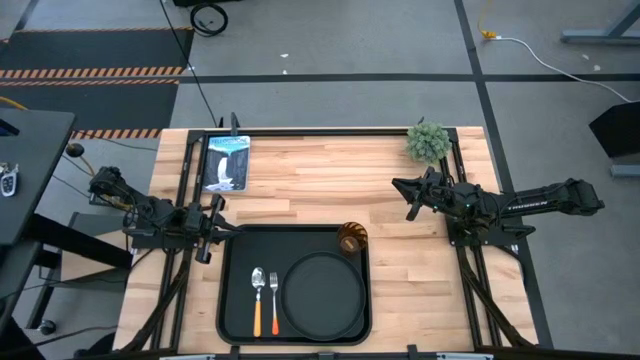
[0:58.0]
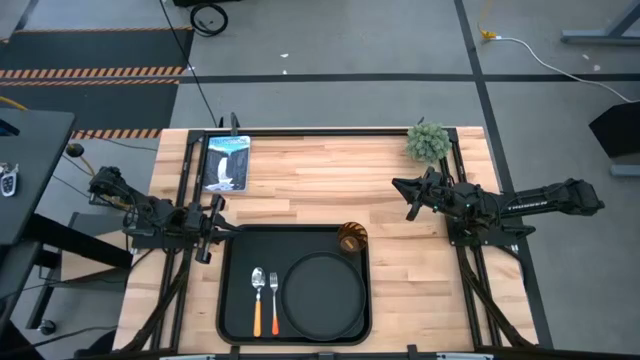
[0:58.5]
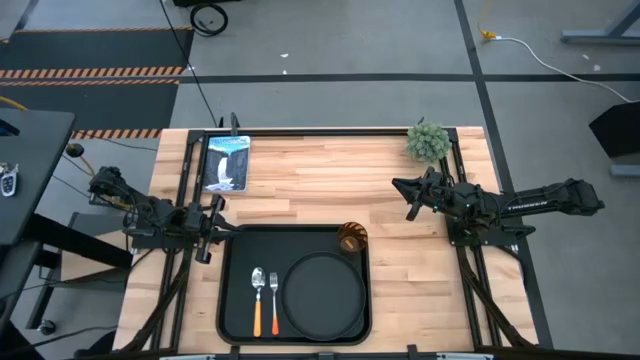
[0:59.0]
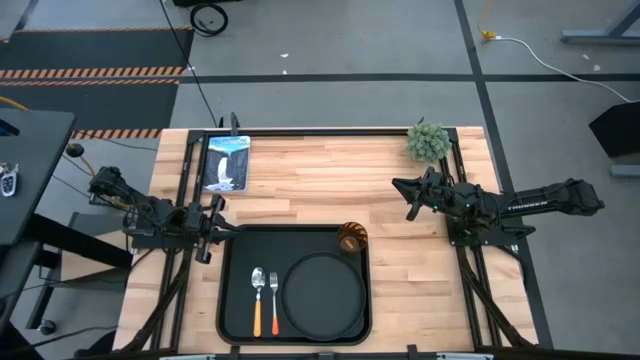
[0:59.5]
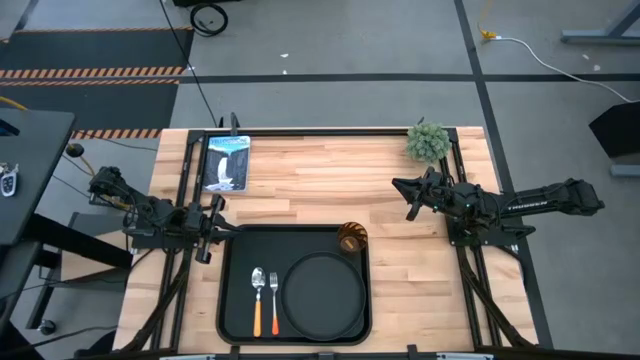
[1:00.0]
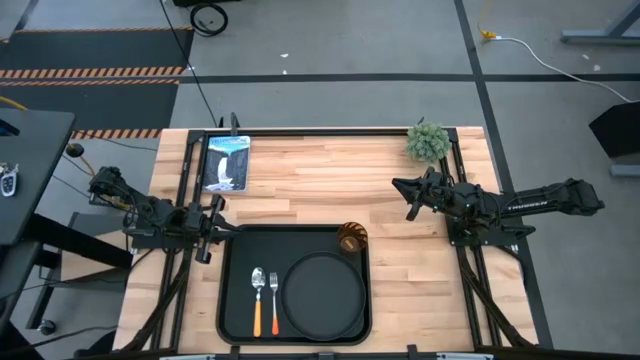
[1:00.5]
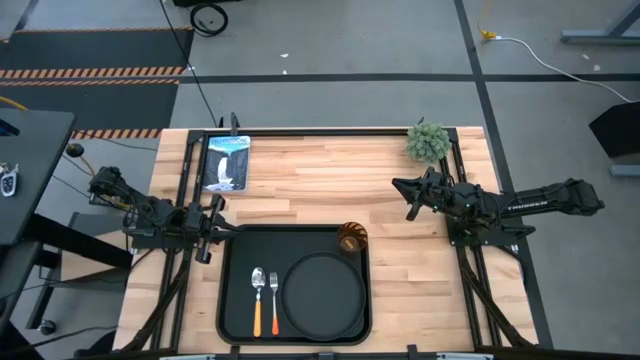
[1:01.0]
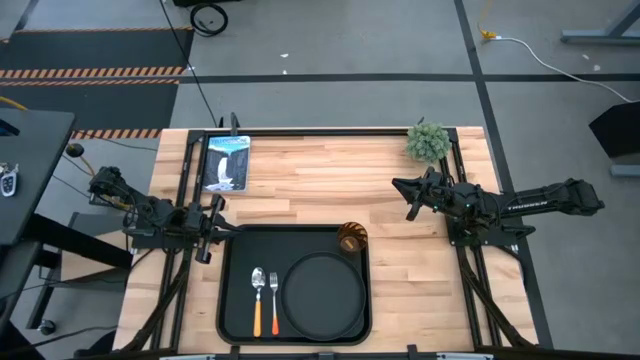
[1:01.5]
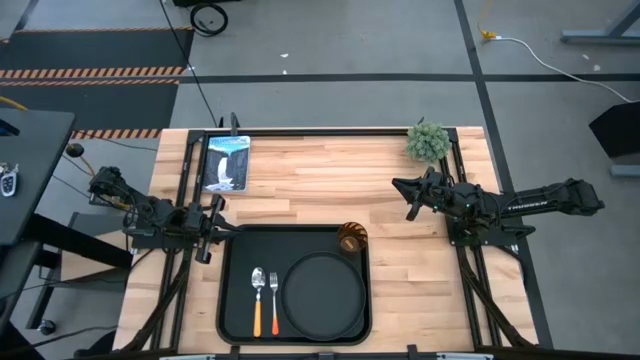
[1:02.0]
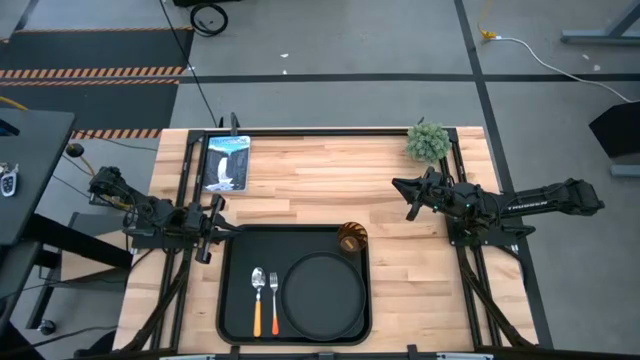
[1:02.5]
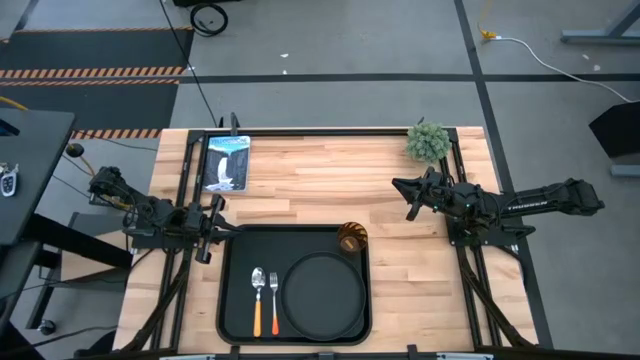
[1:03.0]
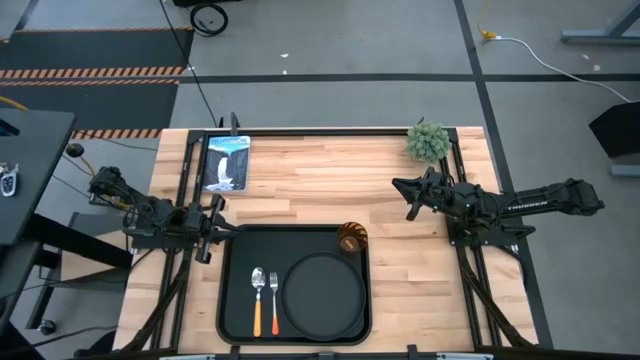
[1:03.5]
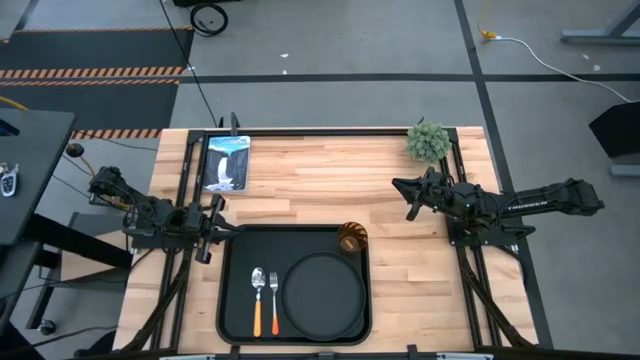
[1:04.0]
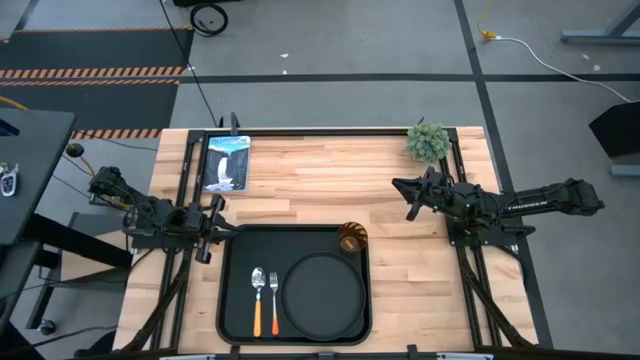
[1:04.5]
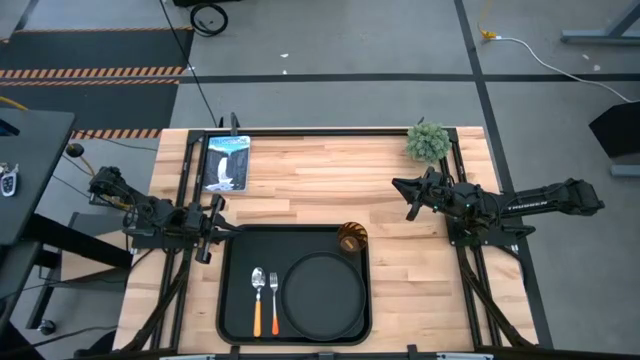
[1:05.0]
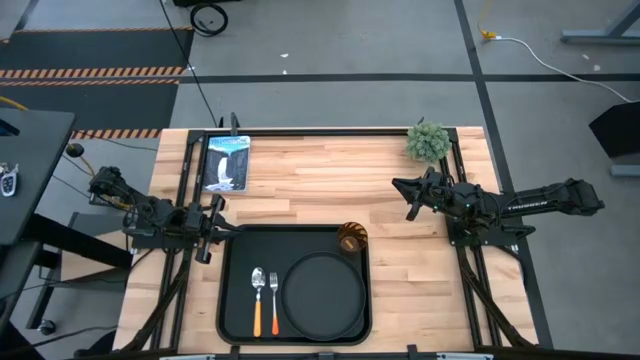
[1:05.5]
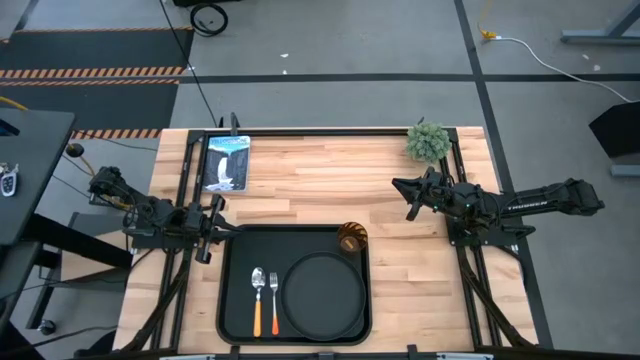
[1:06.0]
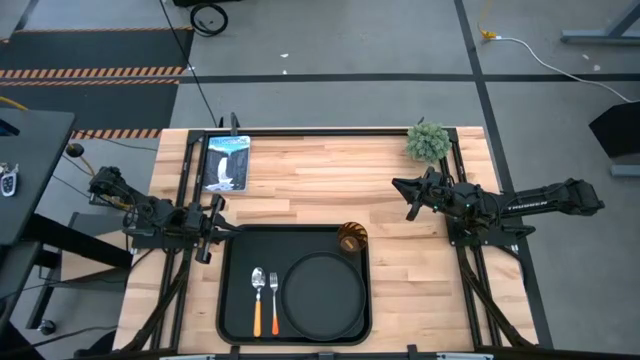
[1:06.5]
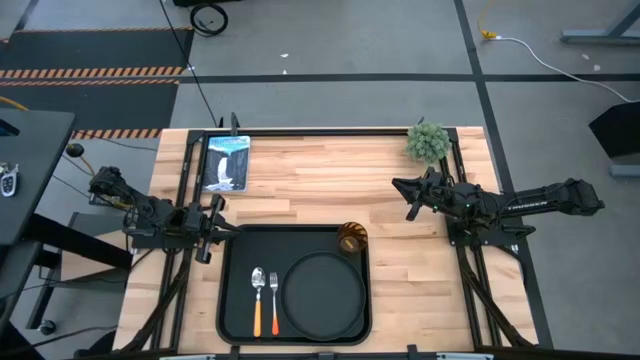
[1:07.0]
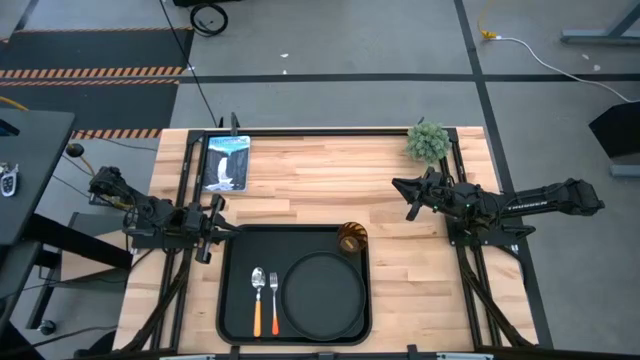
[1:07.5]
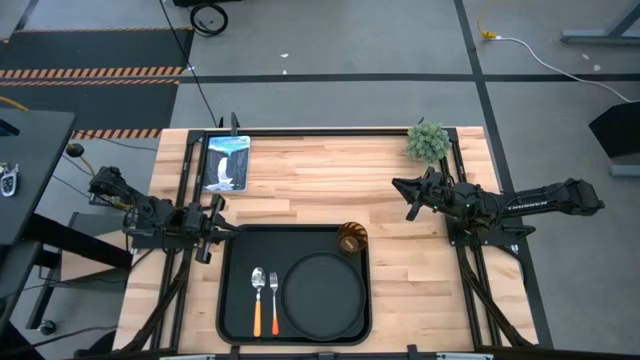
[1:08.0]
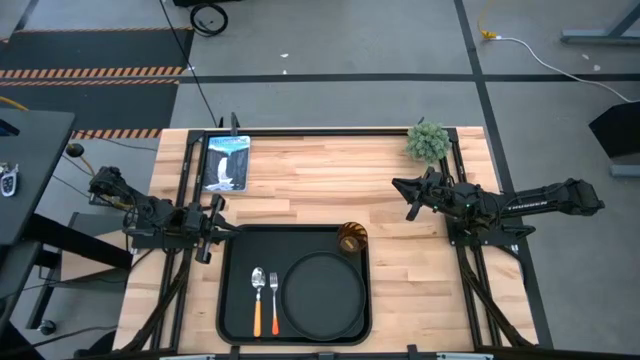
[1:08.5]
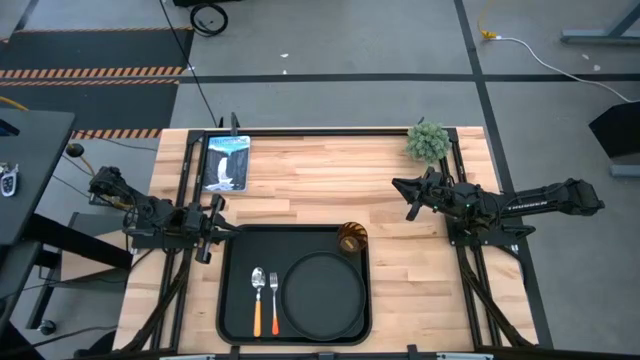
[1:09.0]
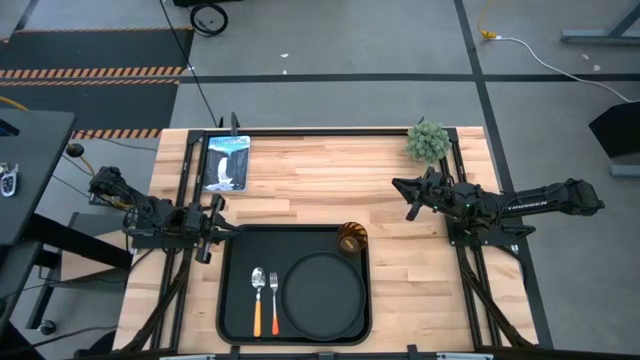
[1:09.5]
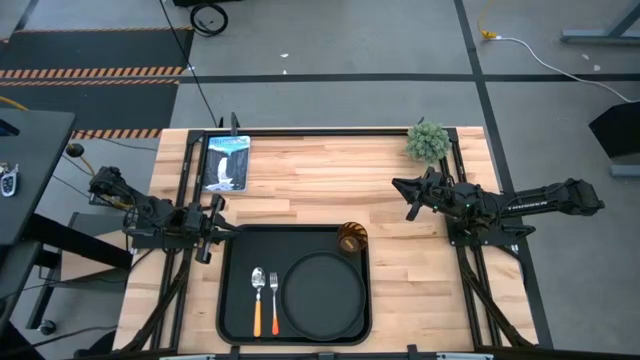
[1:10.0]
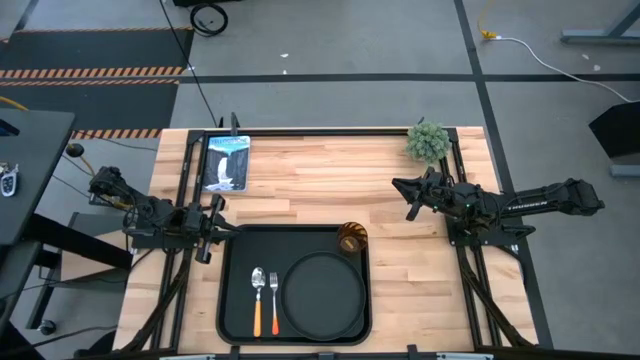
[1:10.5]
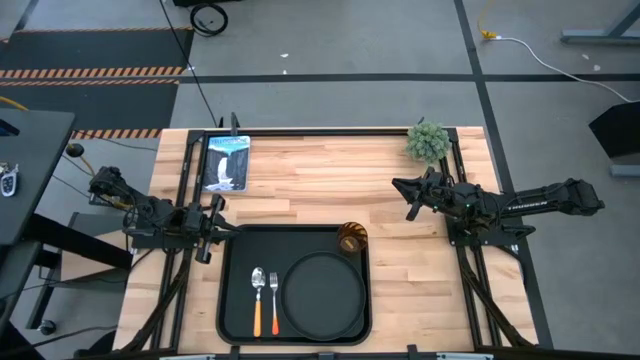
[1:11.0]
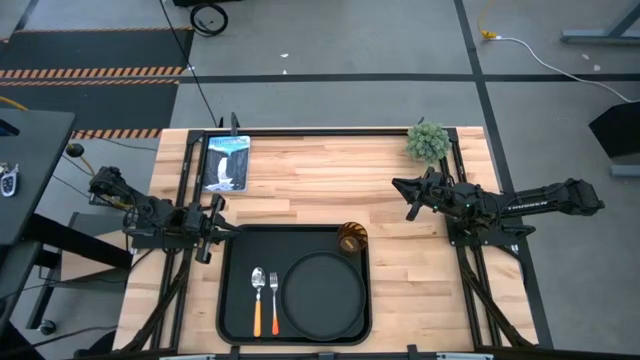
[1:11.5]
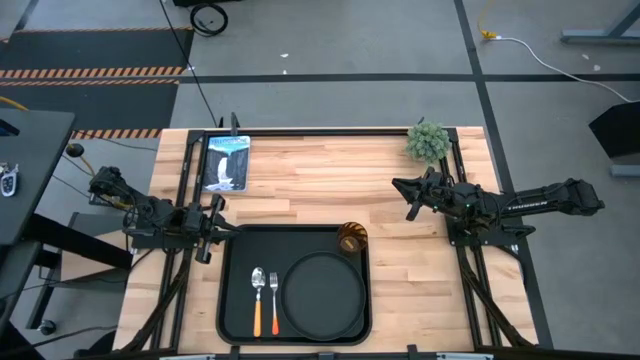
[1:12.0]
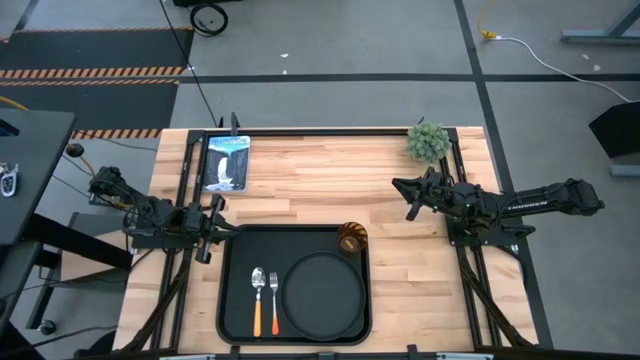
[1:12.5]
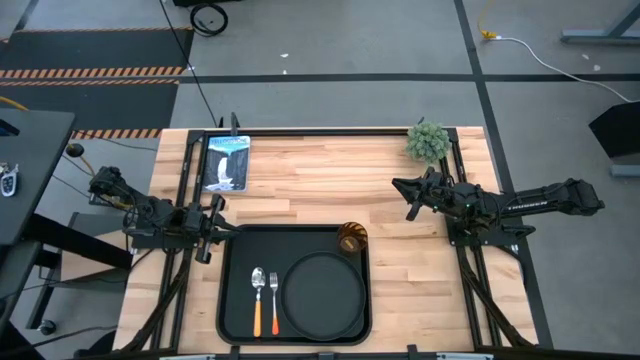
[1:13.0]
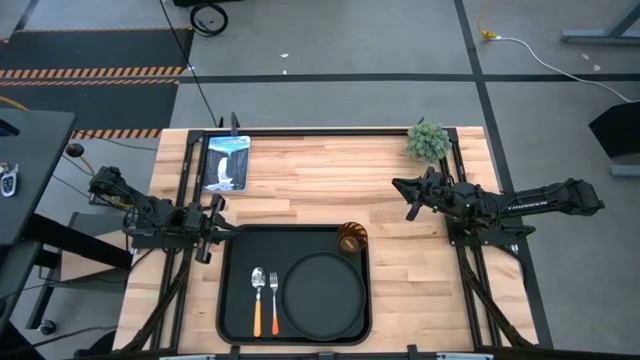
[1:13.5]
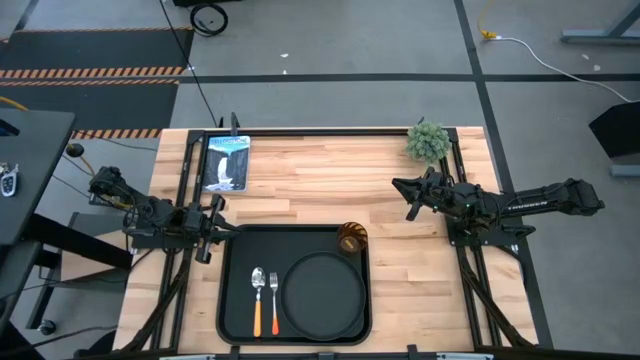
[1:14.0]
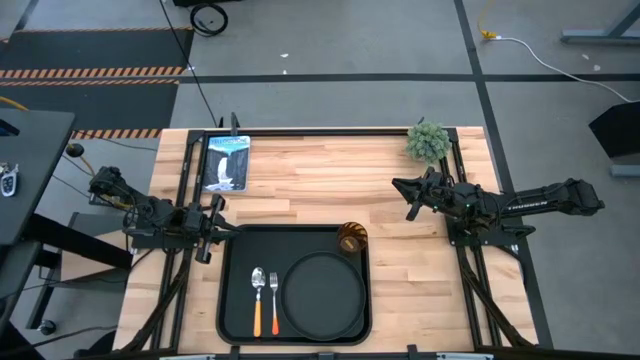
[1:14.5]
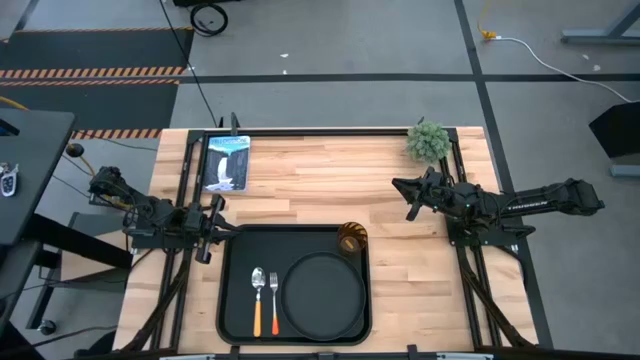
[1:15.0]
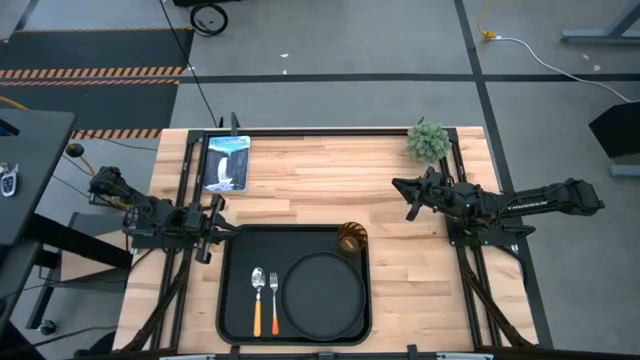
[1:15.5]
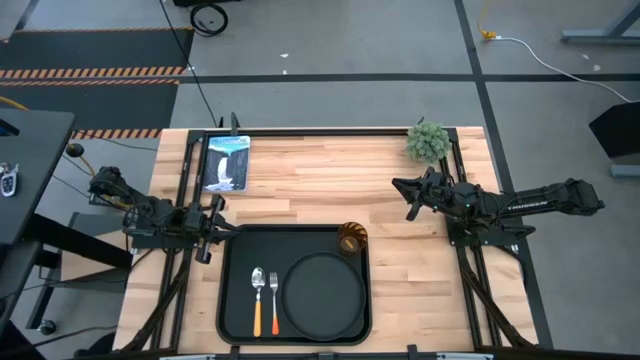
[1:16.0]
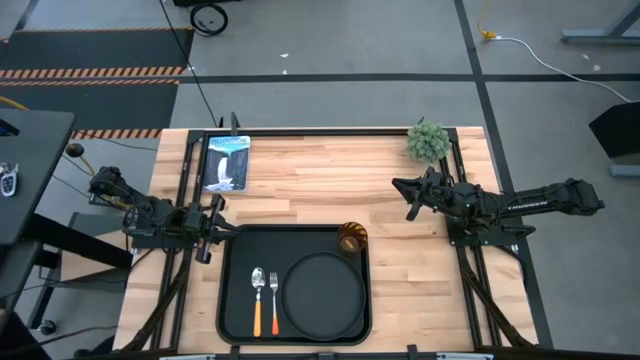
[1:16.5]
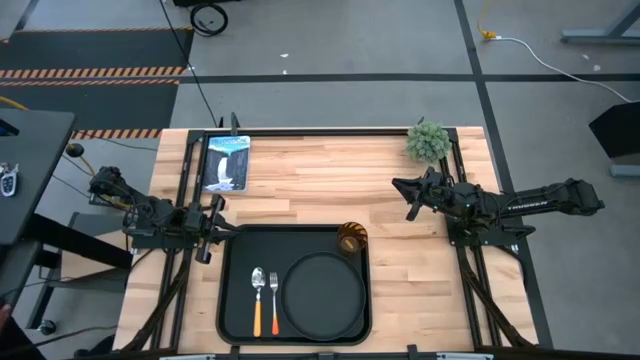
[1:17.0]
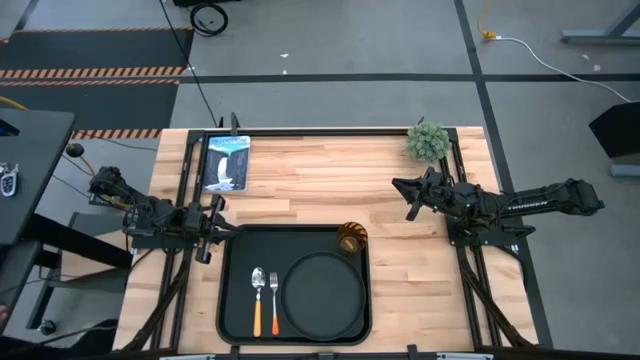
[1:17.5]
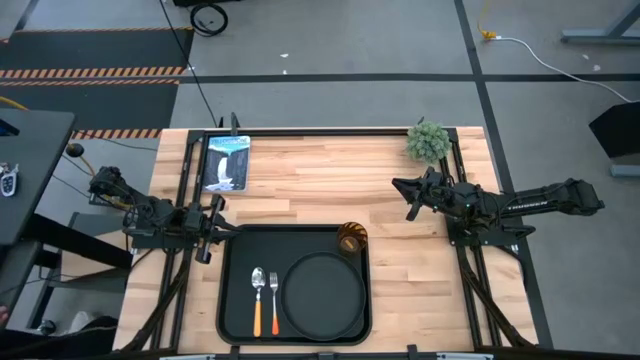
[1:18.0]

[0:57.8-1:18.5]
Task: Pick and place plate/cup/fork/spoon on tray
Return to Home Position

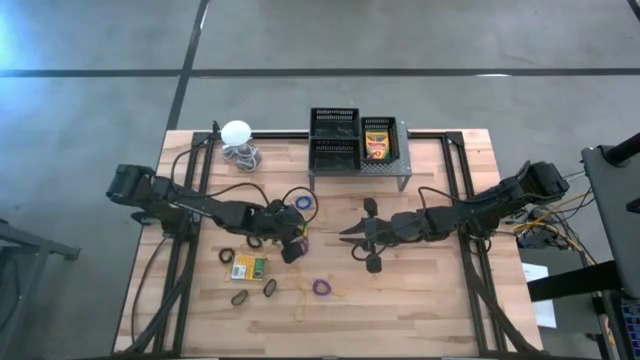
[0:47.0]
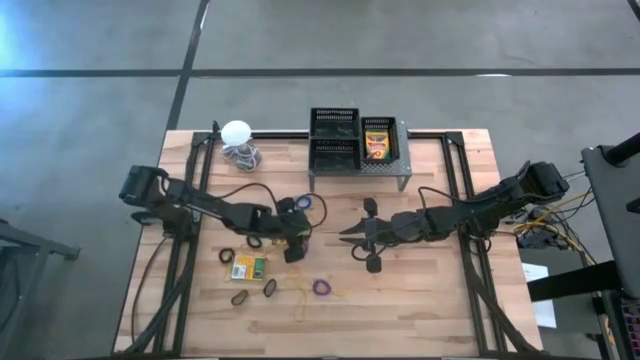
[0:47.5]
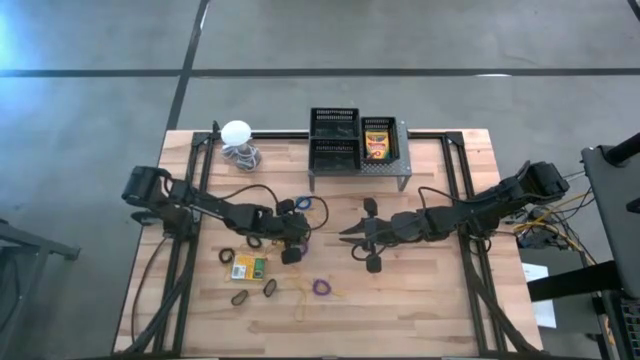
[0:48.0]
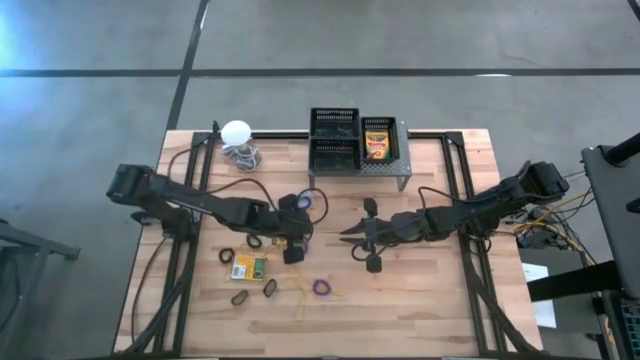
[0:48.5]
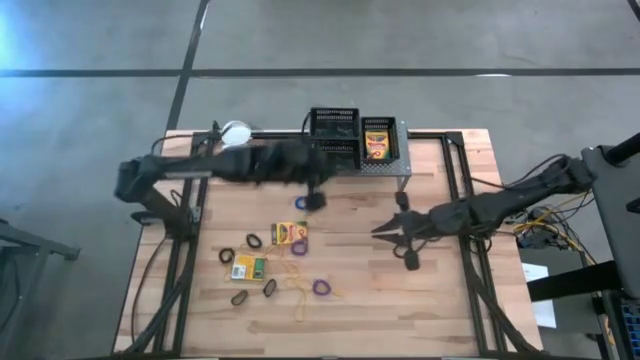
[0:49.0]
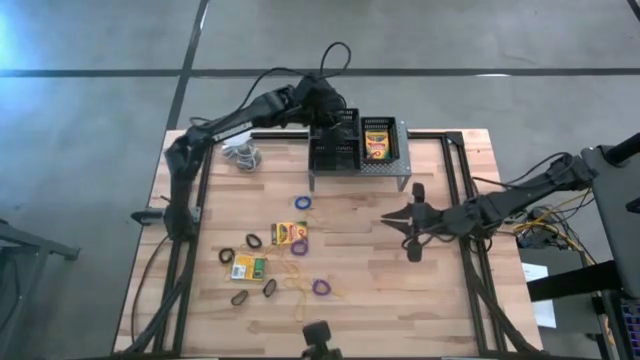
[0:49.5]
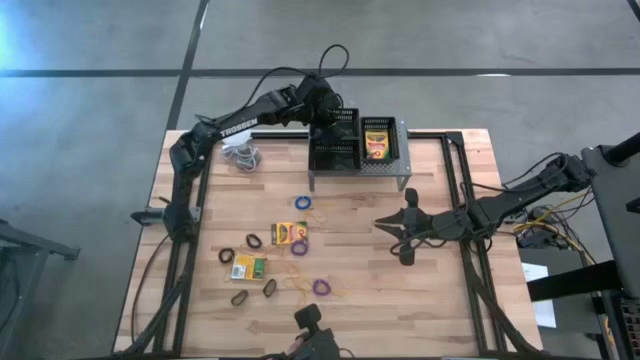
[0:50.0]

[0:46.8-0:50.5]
Task: Pick & Place Office Desk Supplies
Put the green spring keychain into the top left black bin
